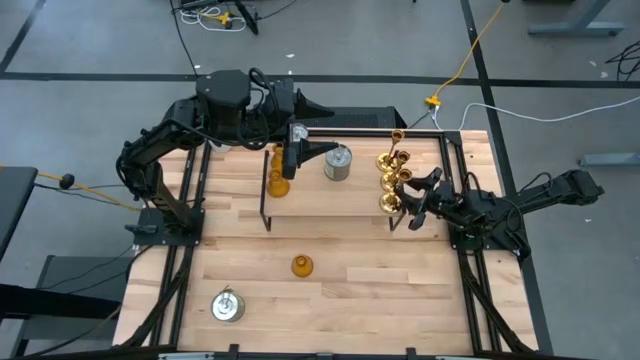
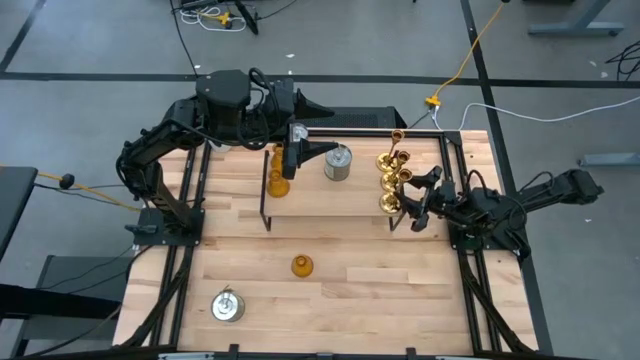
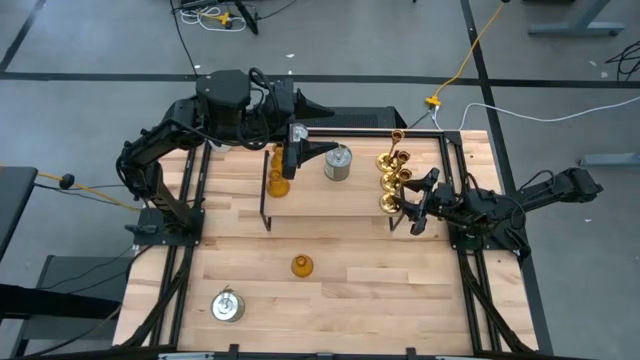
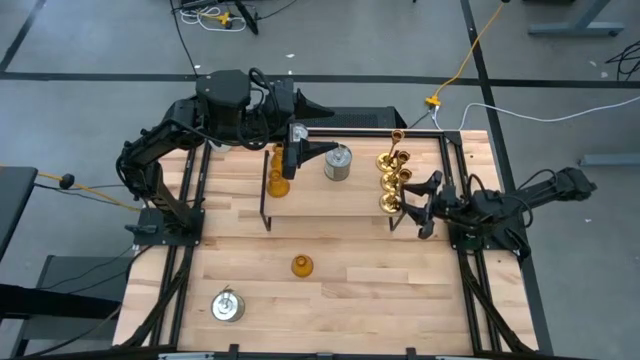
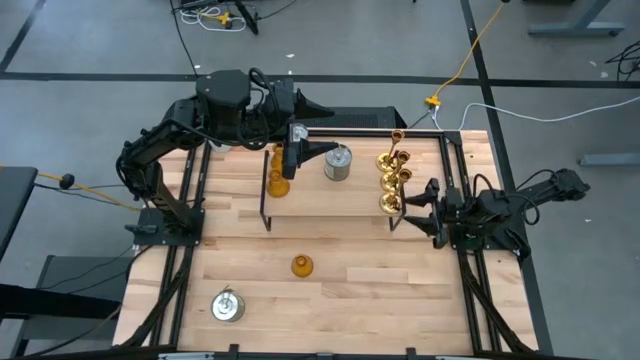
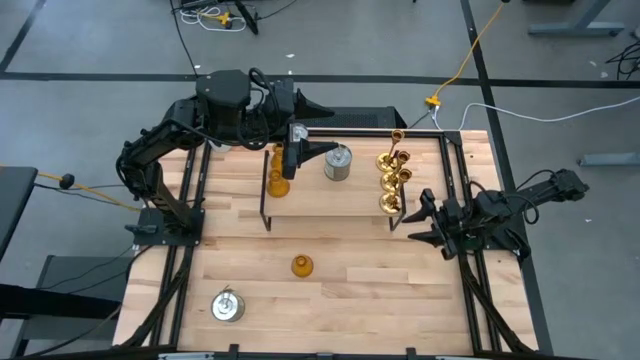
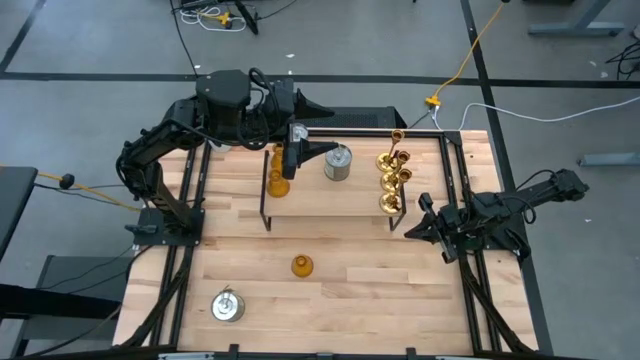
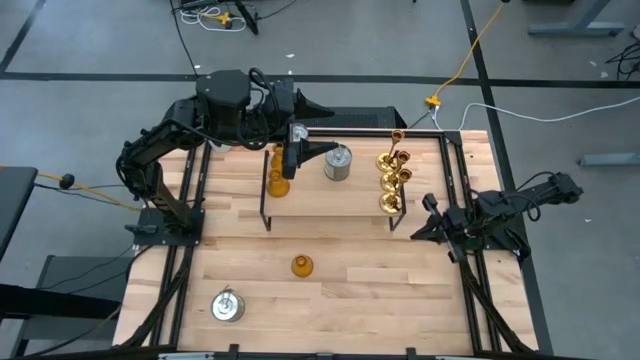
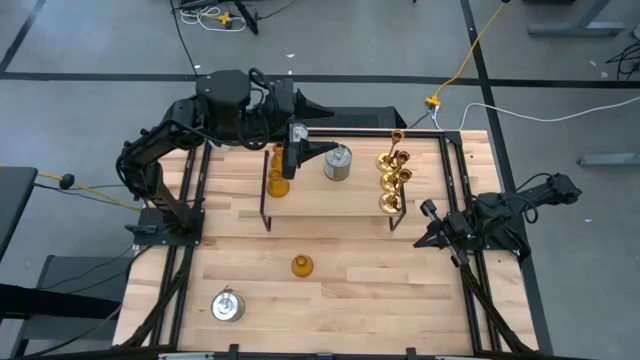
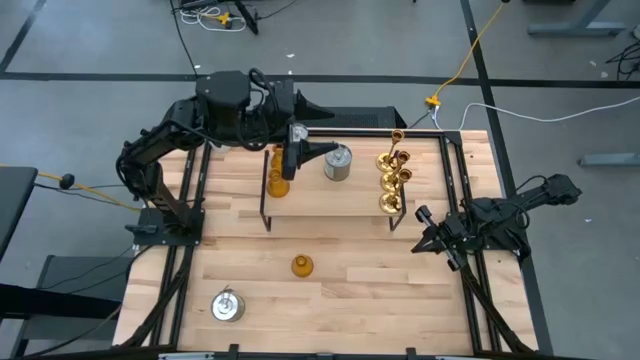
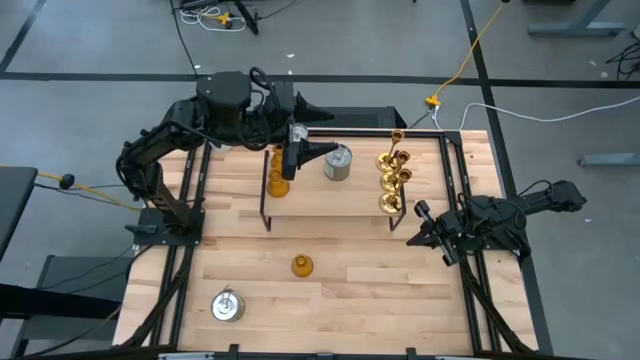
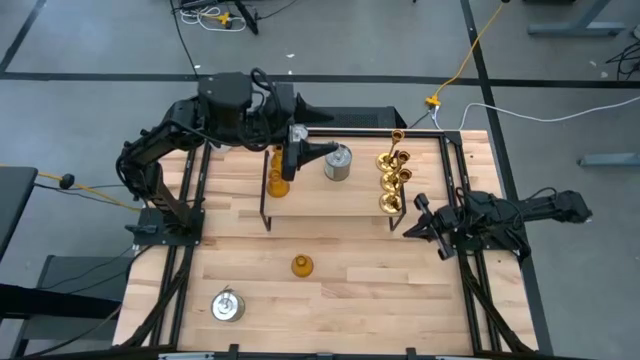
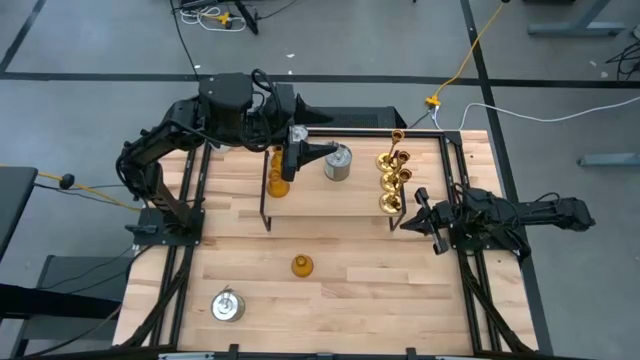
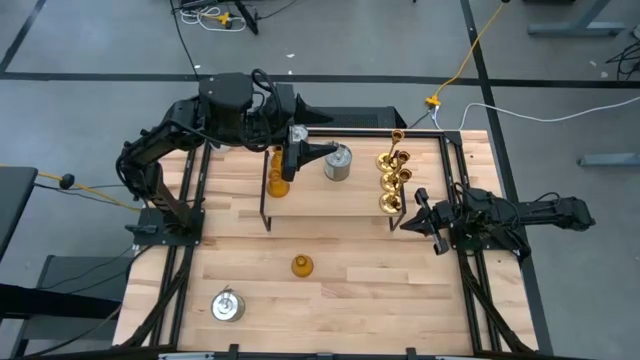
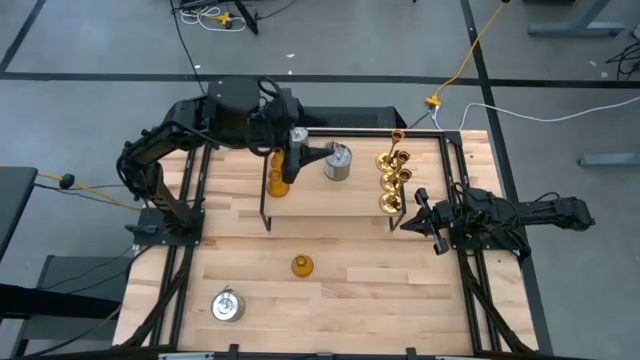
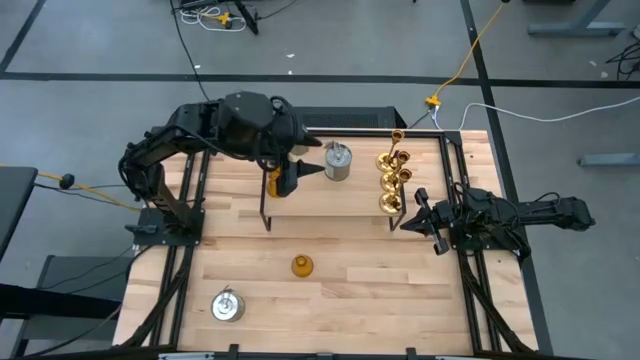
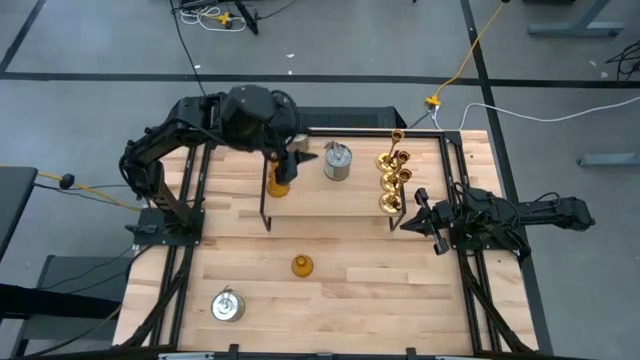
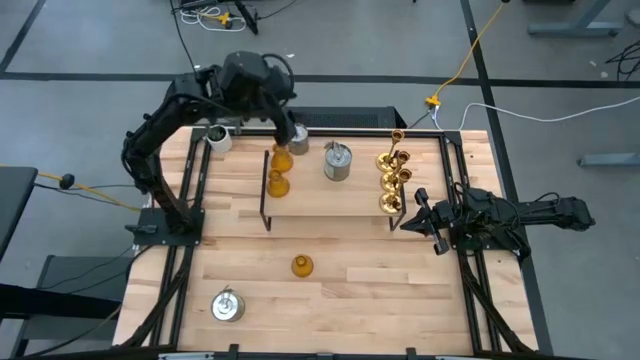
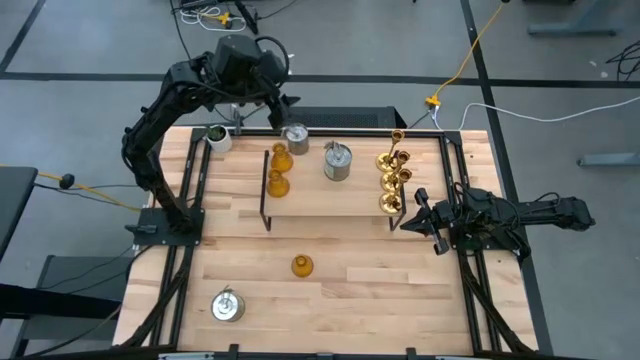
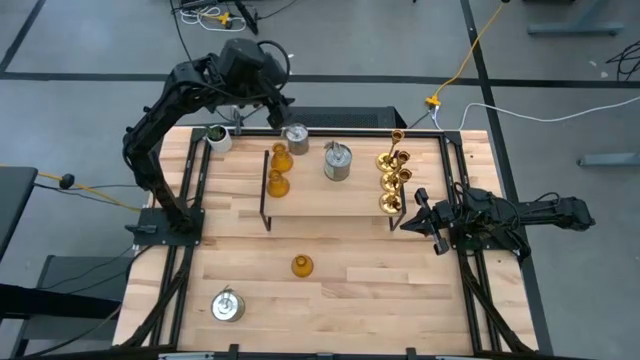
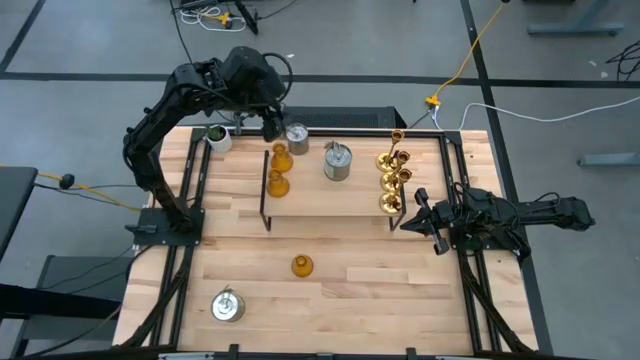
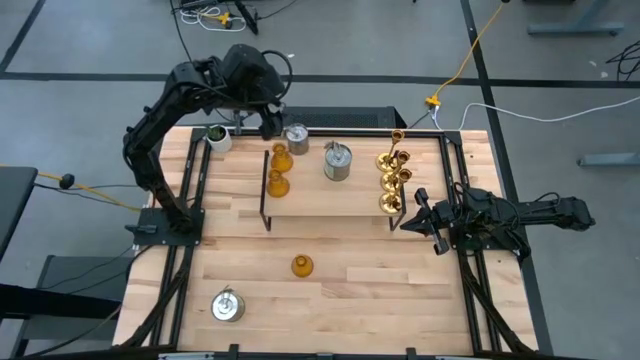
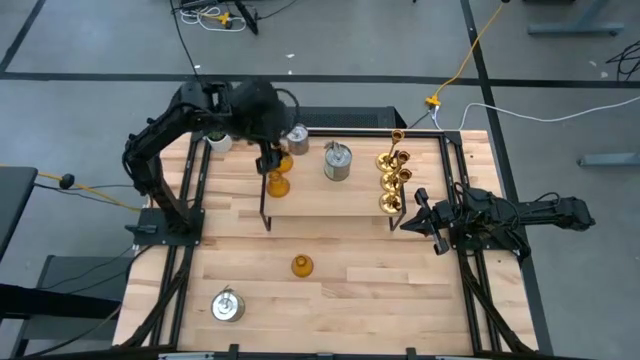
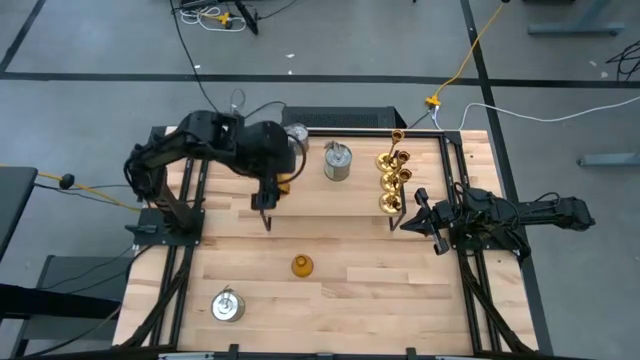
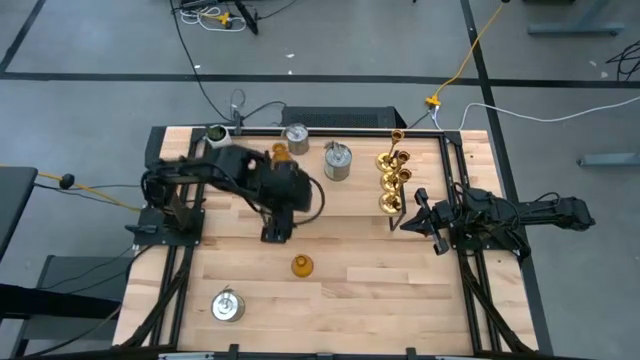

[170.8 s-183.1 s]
Task: Pick & Place candle stick holders
Put the glass candle holder on the shelf aligned with the other glass candle holder

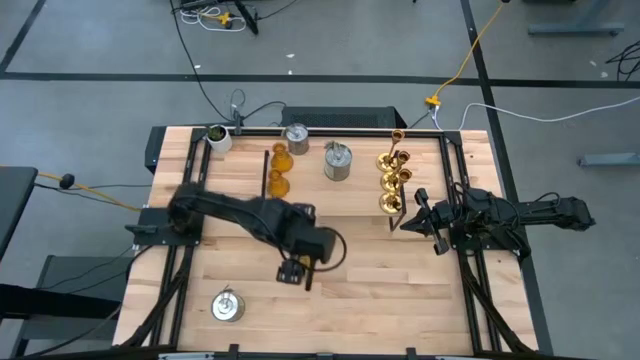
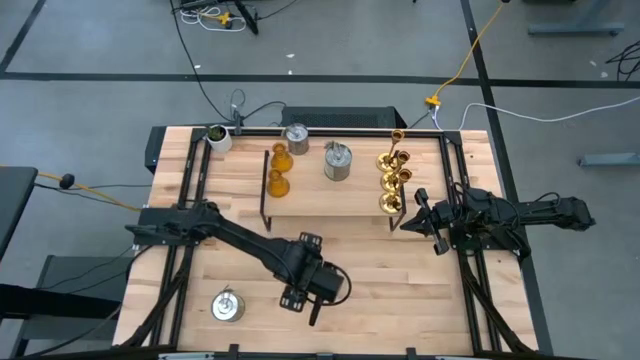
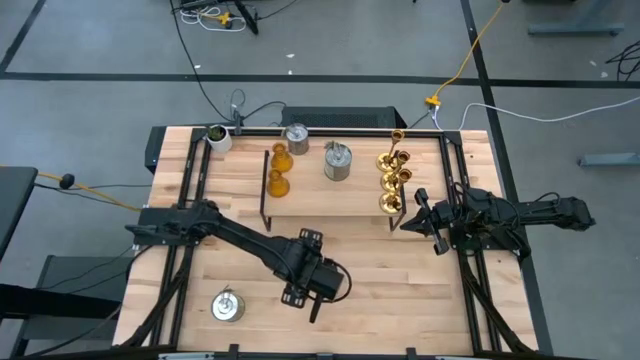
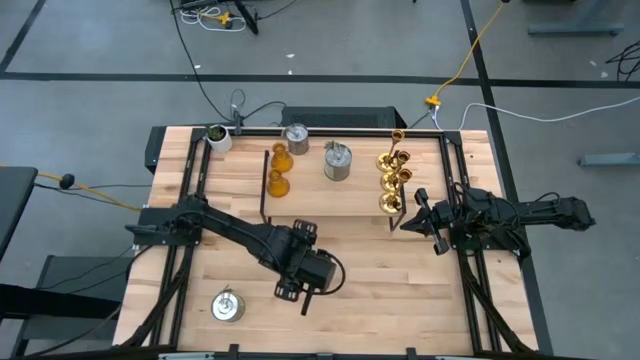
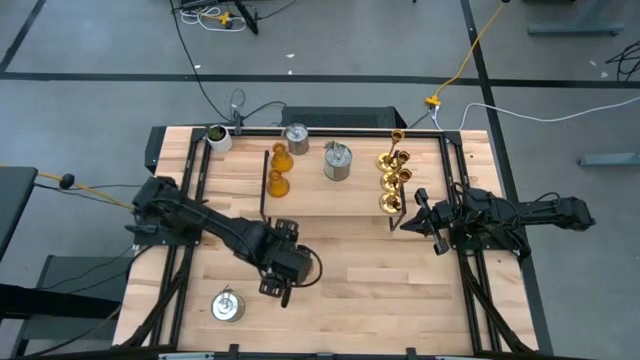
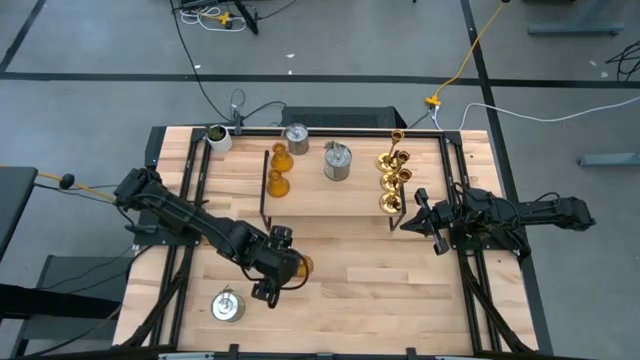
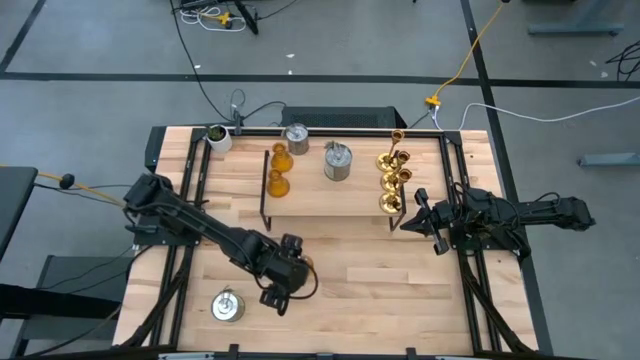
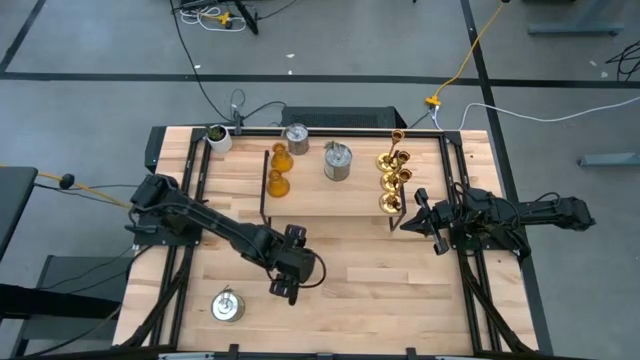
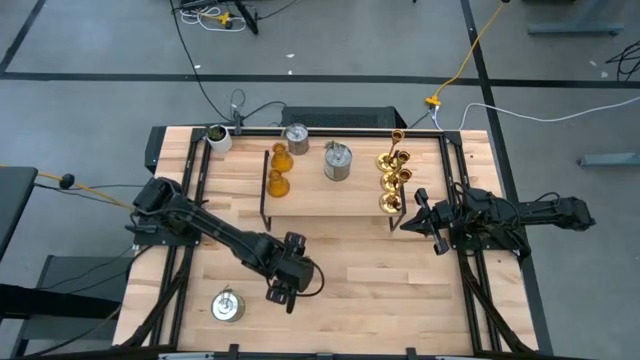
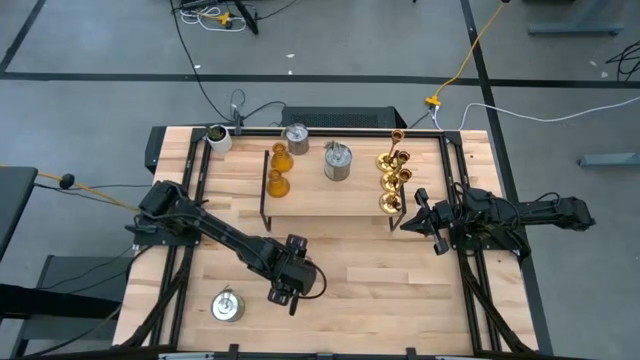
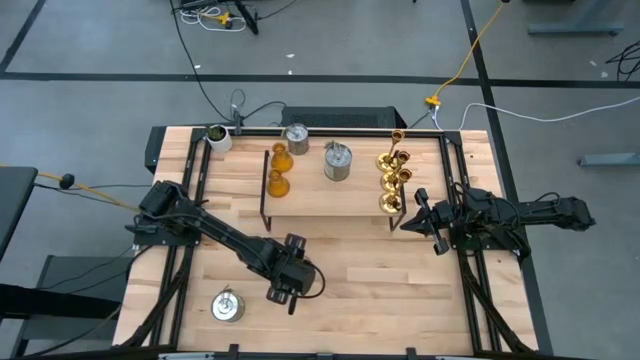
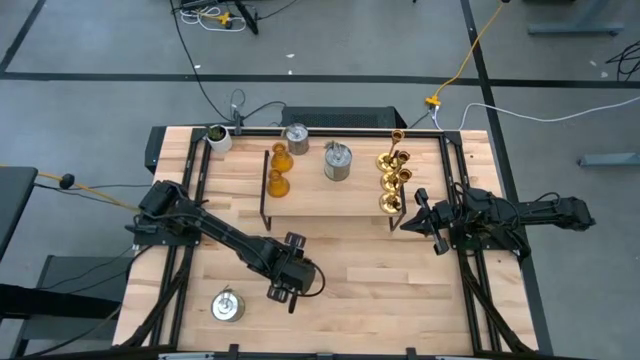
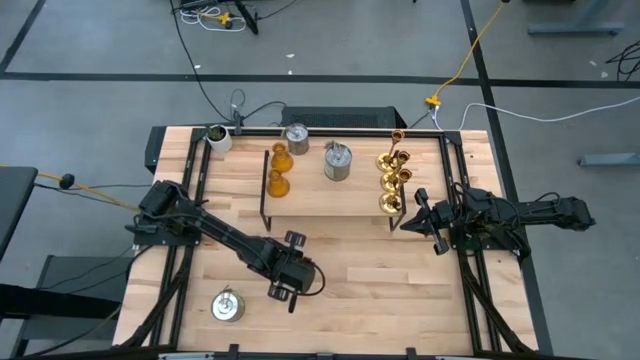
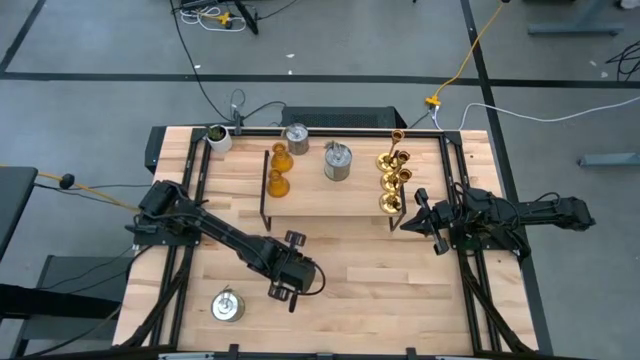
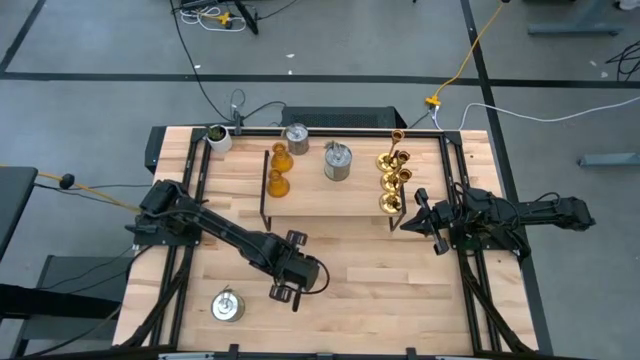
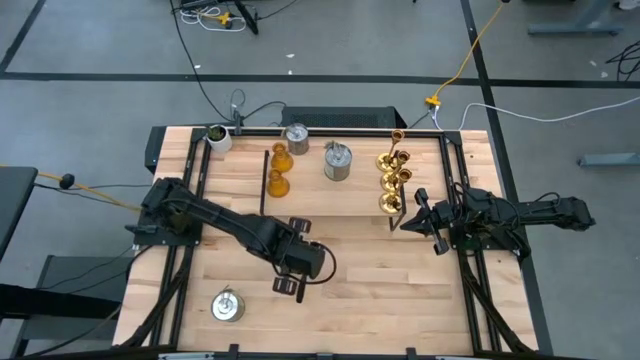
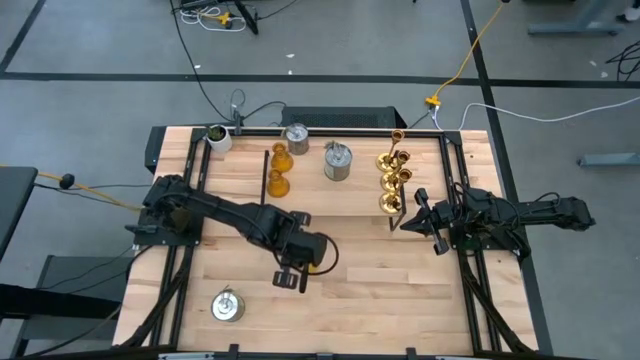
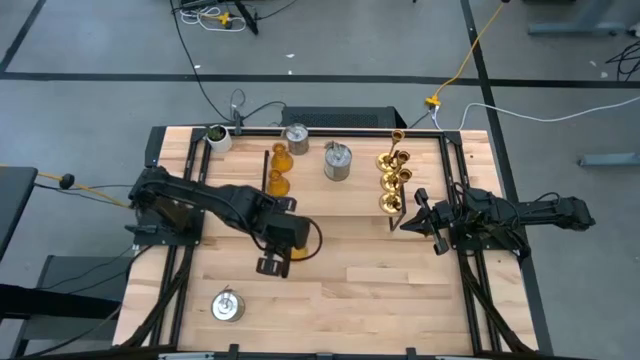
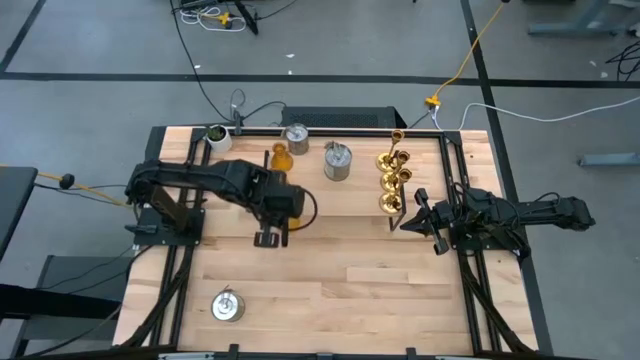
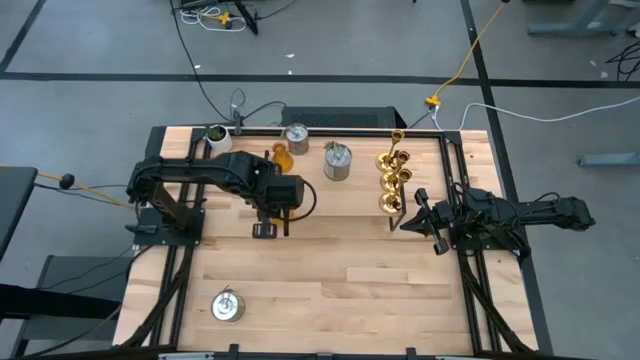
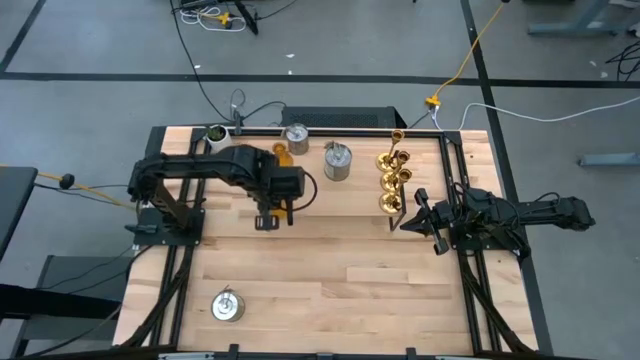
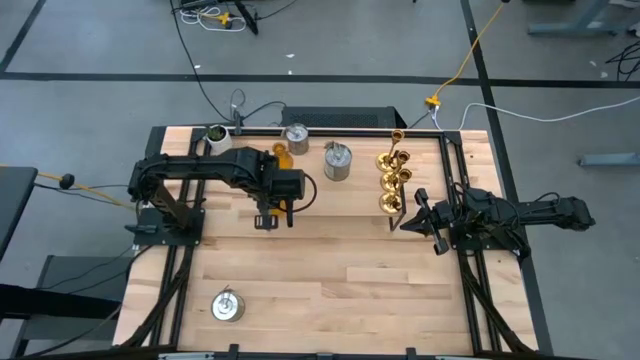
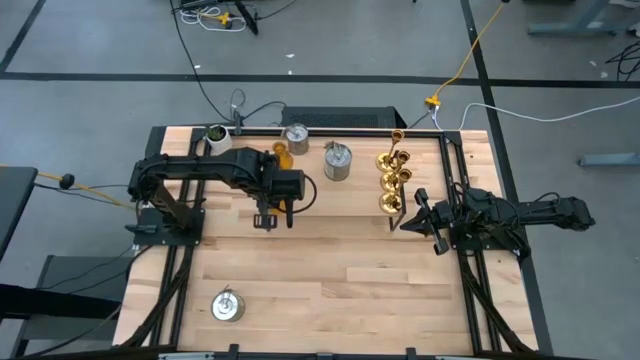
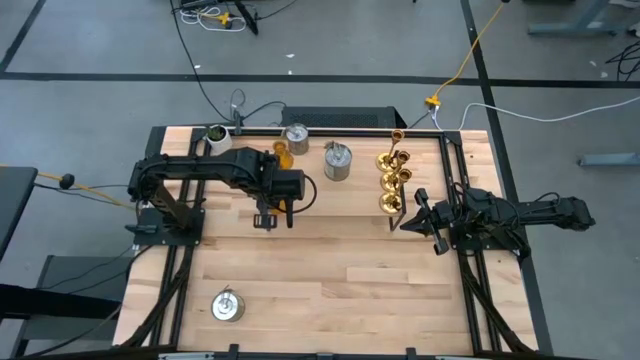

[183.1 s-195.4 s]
Put the glass candle holder on the shelf aligned with the other glass candle holder
